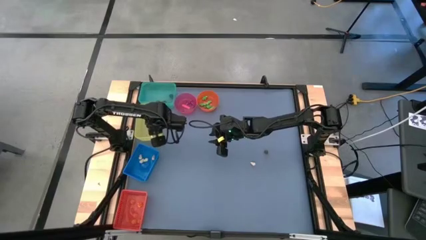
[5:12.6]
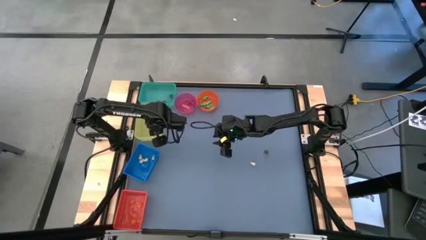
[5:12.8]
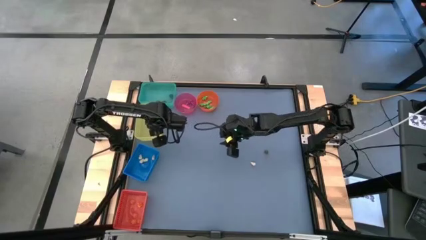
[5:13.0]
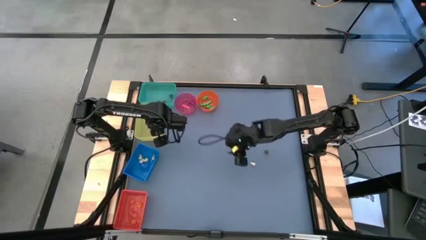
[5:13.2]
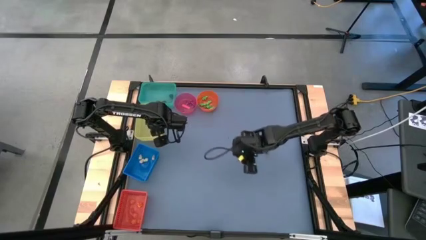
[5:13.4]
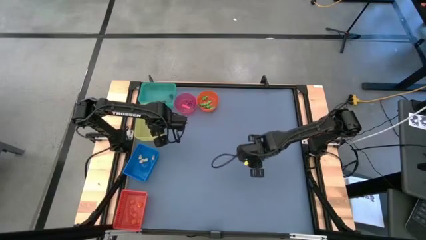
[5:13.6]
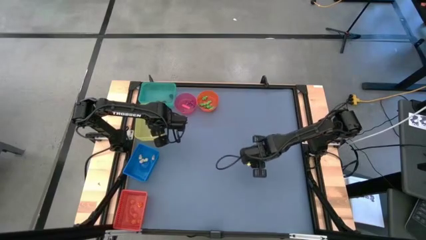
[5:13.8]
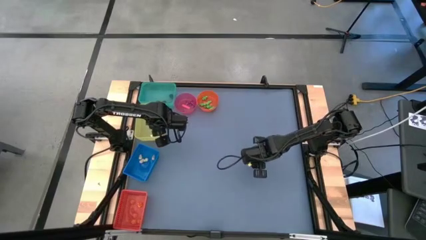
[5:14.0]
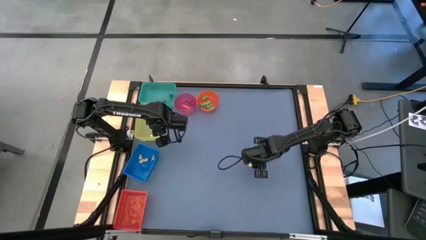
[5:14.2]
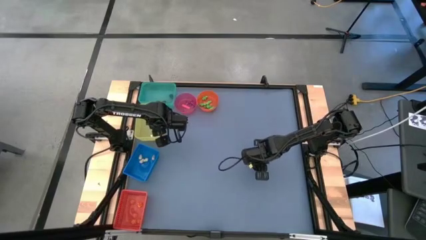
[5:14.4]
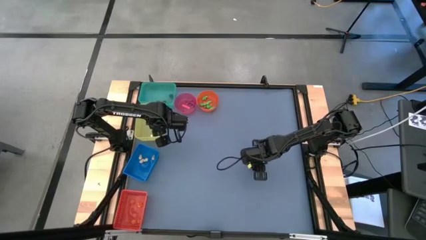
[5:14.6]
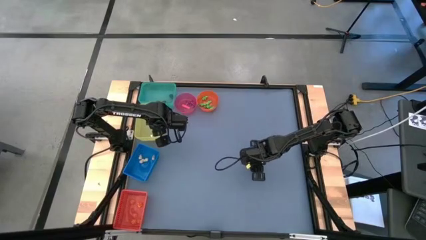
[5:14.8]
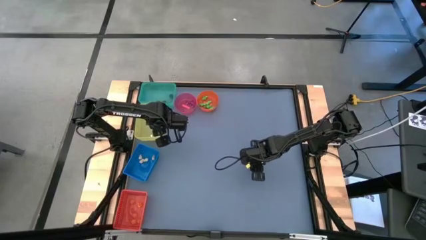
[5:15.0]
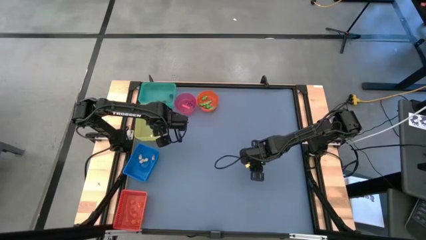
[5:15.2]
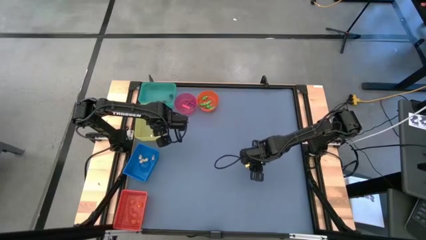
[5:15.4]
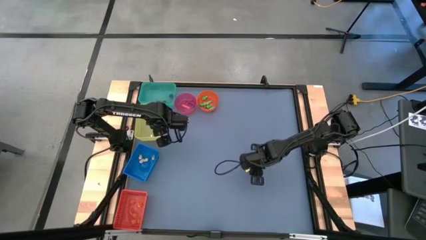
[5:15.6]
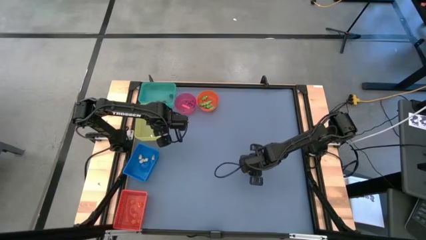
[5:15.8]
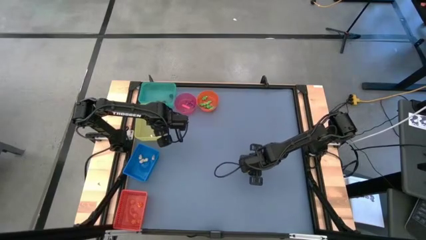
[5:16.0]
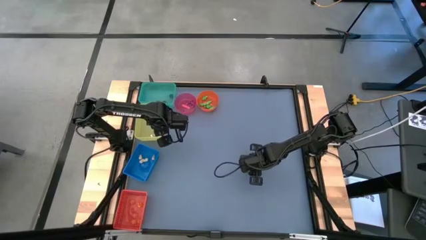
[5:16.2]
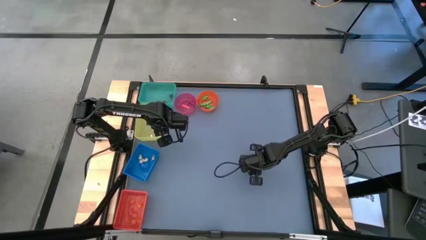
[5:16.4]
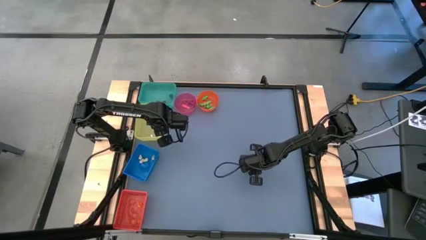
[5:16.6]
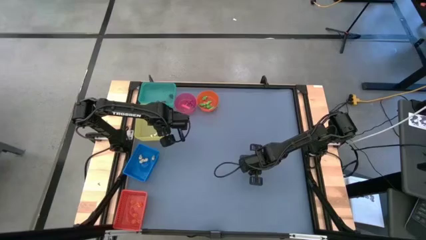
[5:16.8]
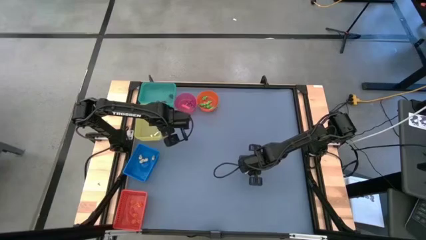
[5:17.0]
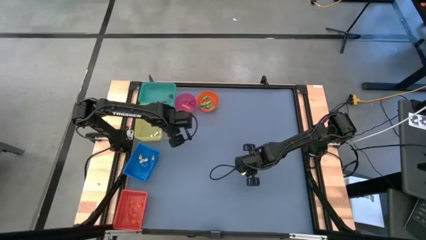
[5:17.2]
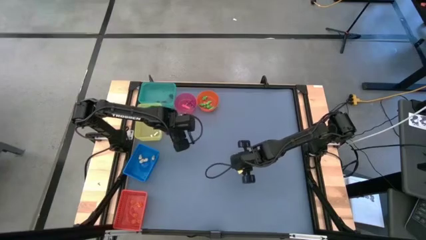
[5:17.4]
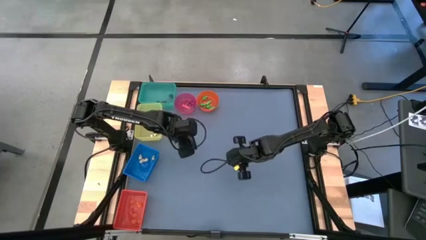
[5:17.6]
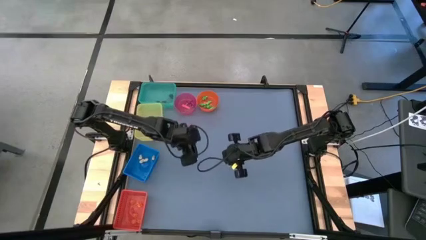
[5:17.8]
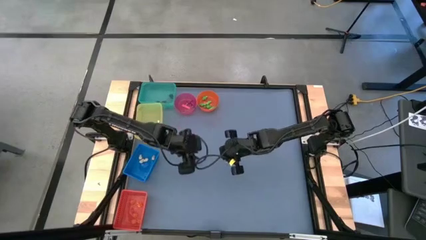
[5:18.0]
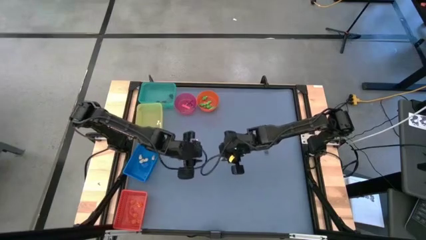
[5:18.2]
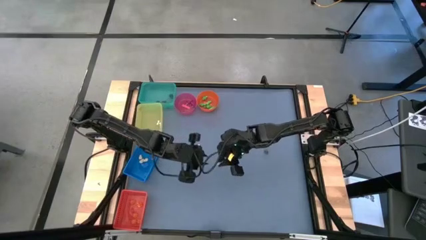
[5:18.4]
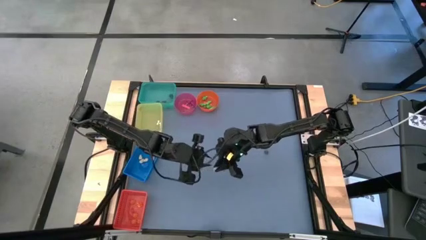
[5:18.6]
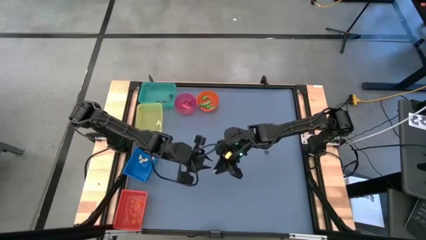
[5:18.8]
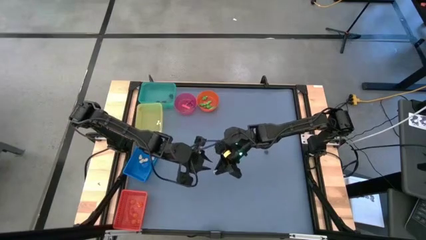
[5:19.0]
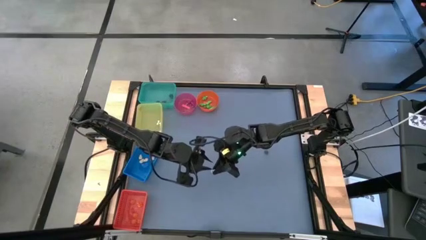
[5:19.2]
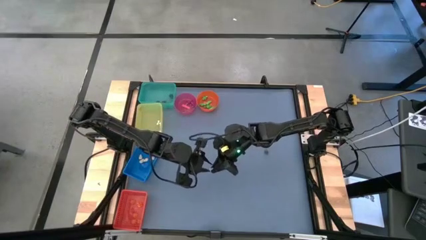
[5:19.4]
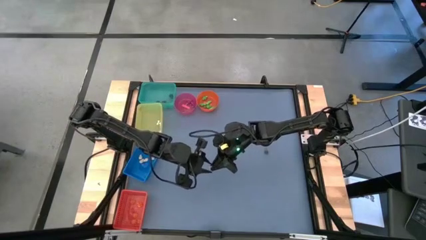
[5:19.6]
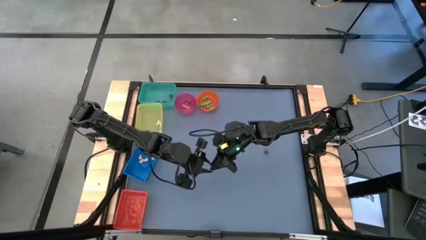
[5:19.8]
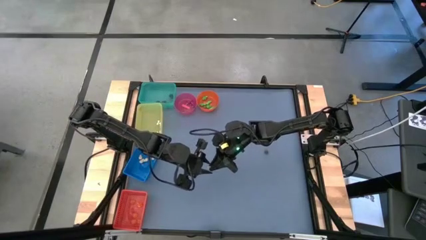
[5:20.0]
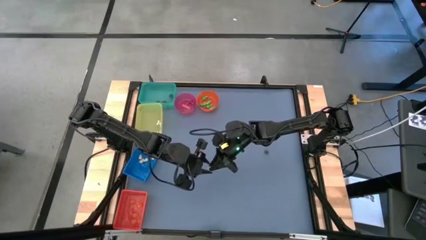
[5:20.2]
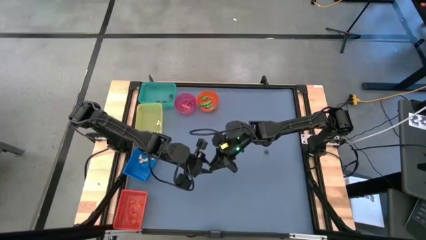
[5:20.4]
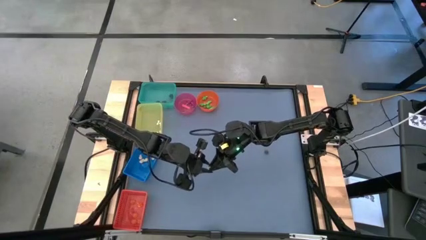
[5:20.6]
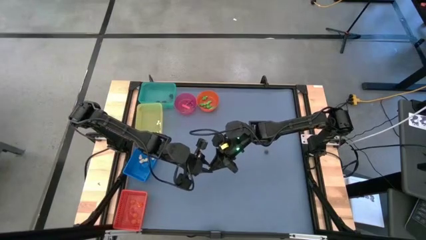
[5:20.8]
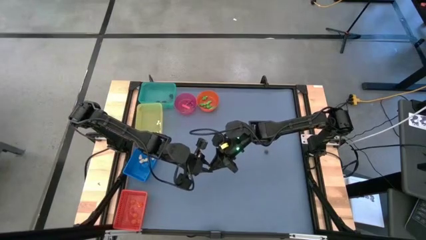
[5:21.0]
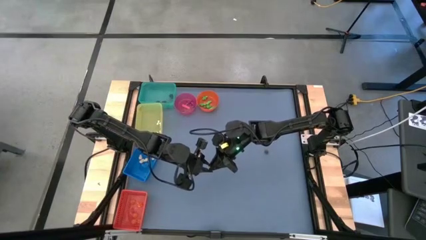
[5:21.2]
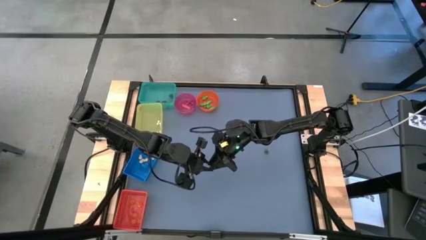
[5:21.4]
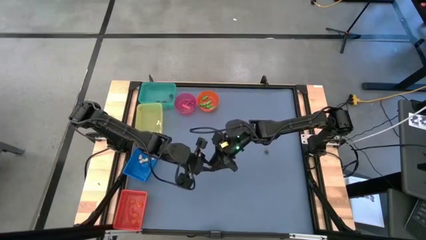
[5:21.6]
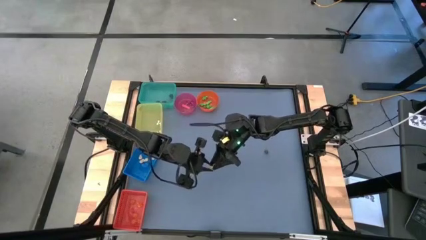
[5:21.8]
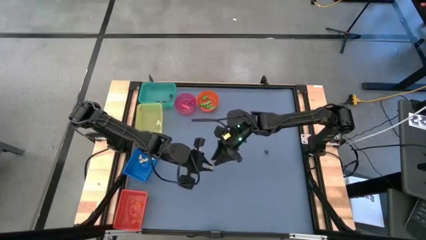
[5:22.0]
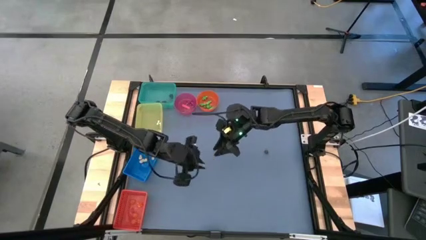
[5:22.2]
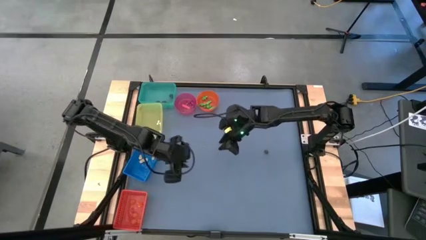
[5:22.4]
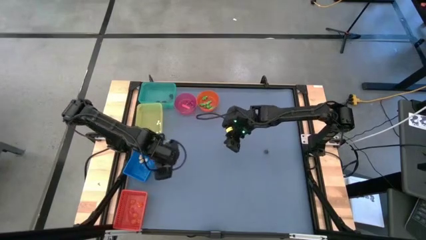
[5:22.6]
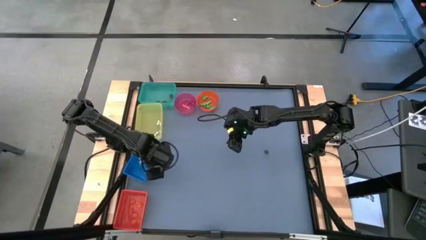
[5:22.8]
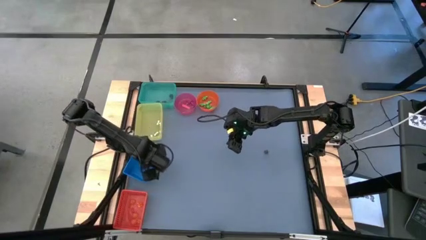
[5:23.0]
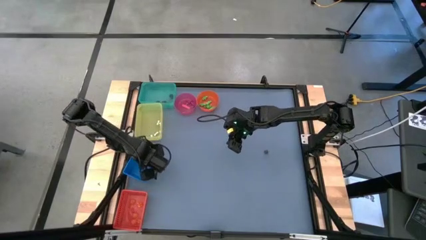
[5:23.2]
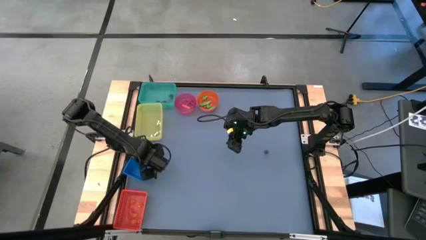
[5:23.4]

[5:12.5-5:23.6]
Task: Sort Halloween decoration
Put the yellow skull toy into the blue bin
